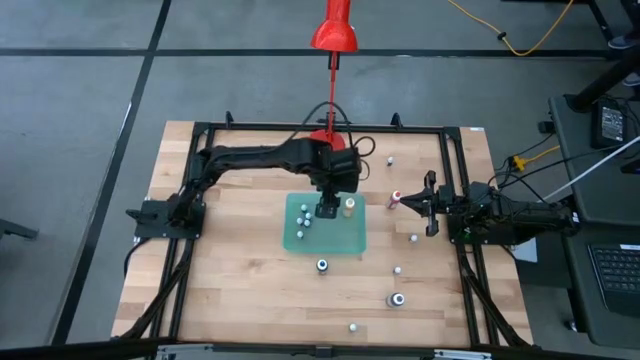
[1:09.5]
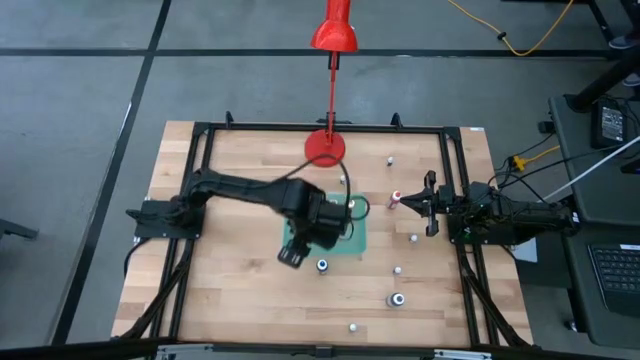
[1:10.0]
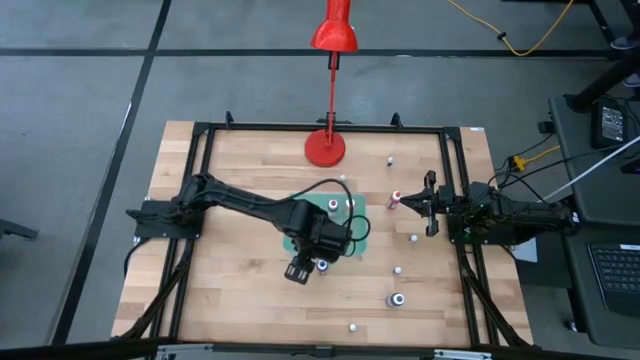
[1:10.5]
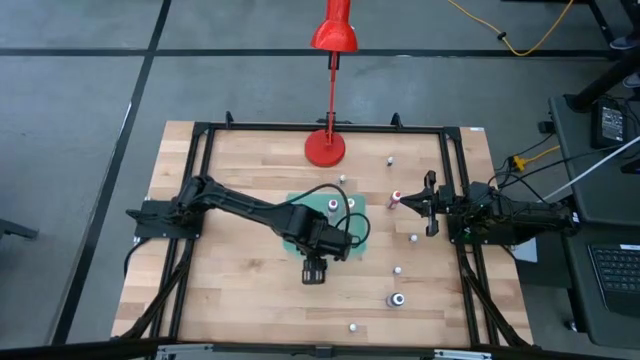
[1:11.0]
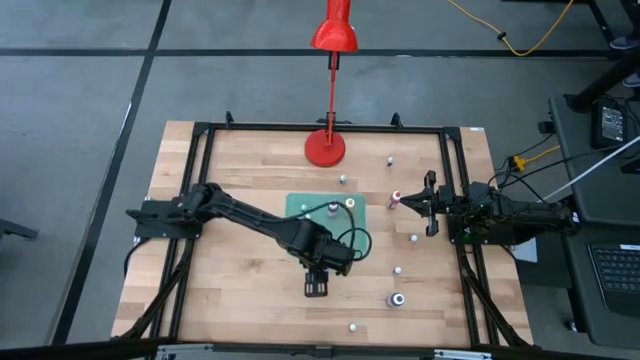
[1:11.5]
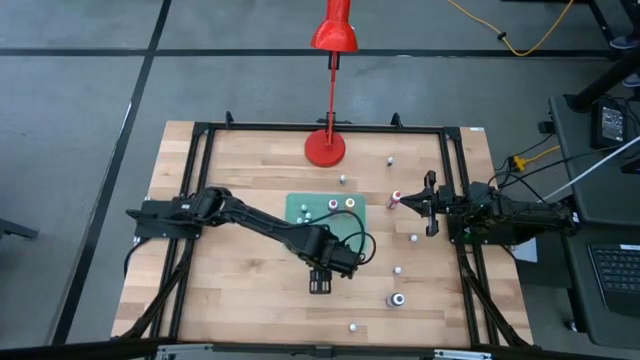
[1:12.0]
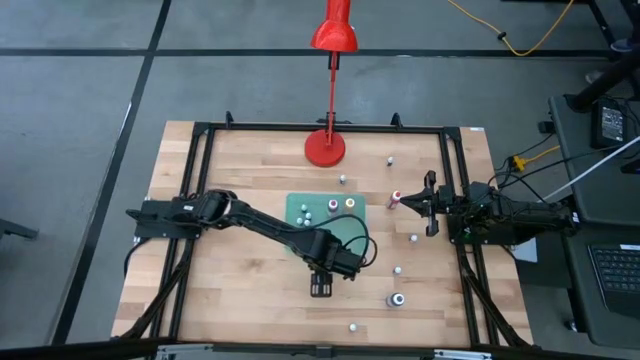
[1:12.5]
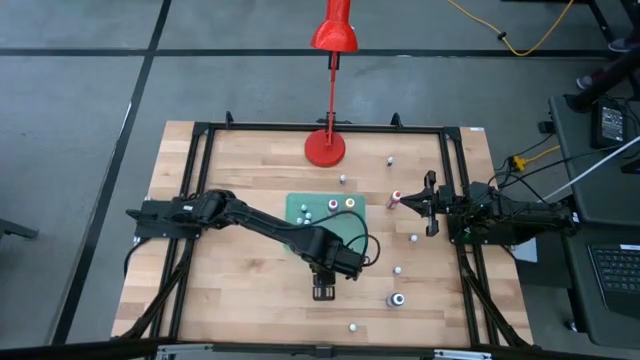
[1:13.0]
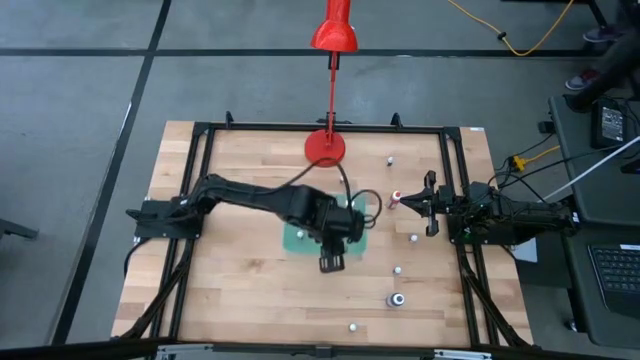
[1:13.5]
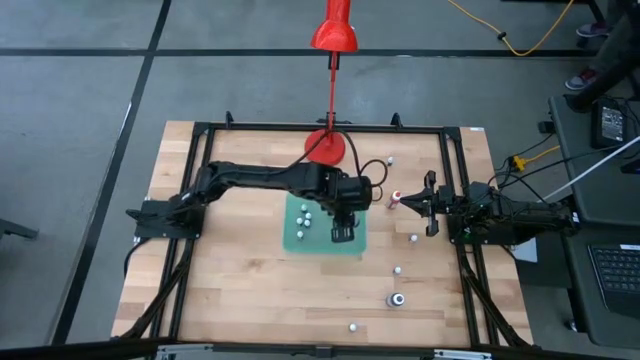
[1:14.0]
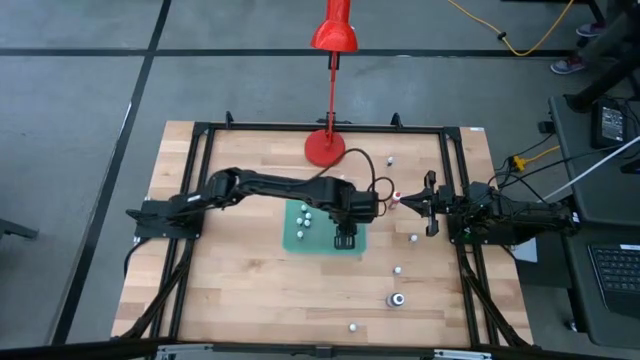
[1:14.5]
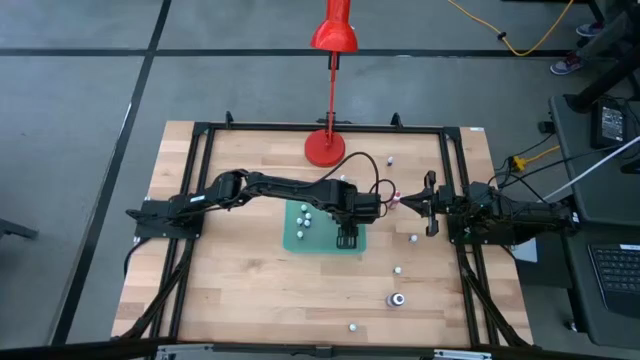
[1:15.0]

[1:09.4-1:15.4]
Task: Pick & Place food coloring
Put the large blue food coloring bottle into the green bin

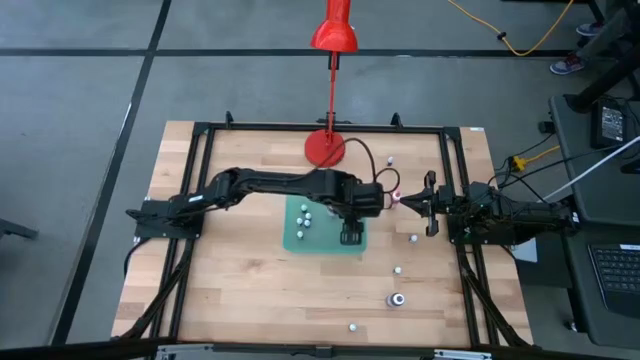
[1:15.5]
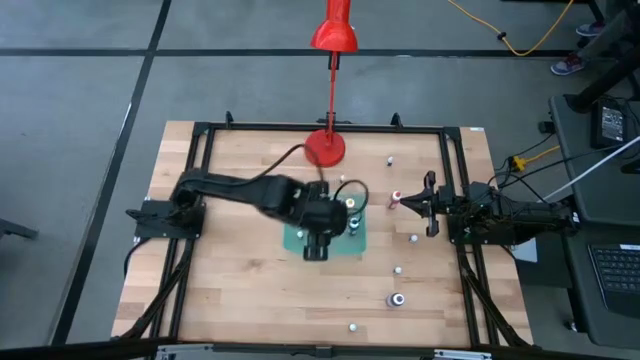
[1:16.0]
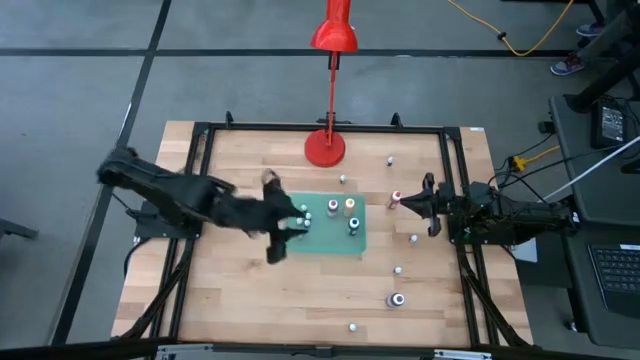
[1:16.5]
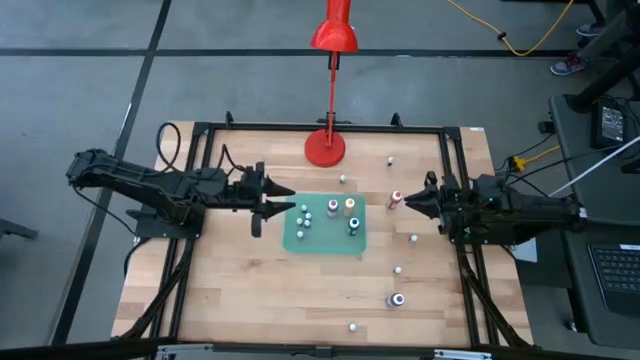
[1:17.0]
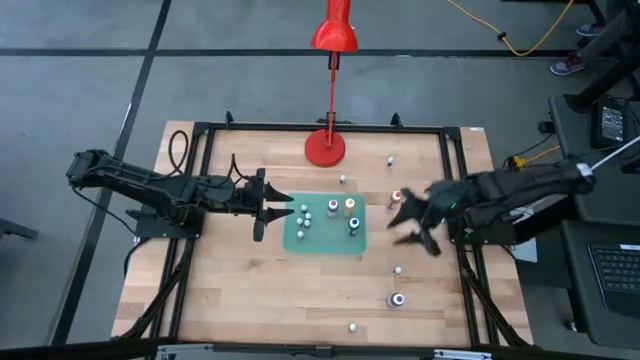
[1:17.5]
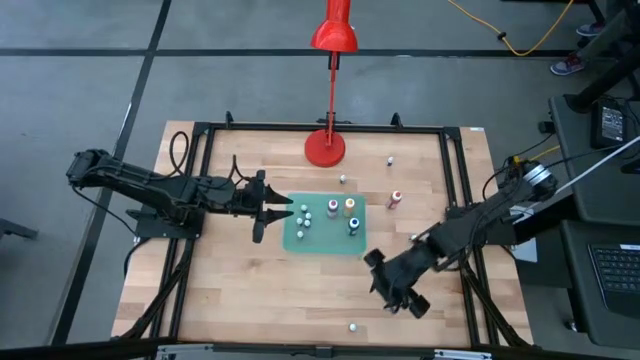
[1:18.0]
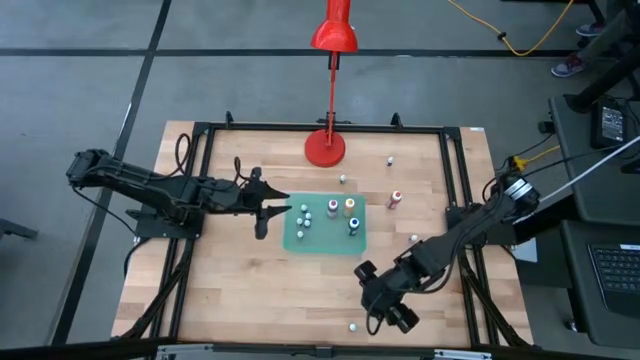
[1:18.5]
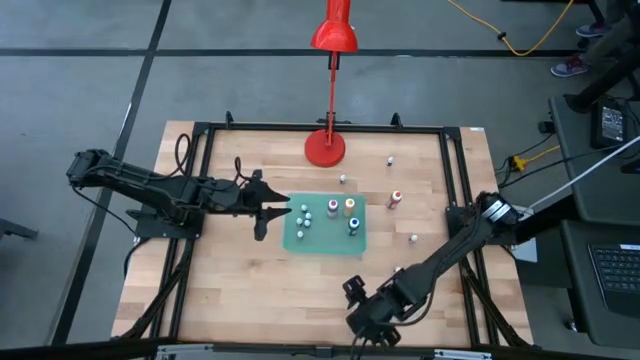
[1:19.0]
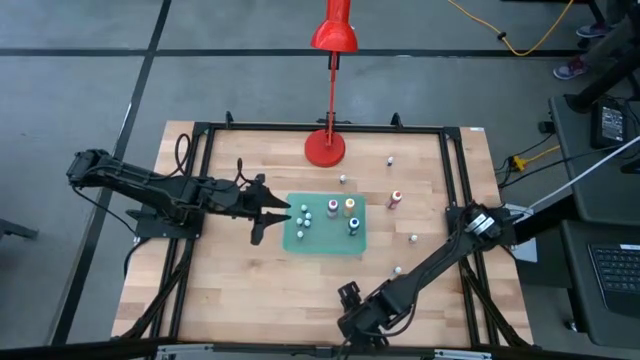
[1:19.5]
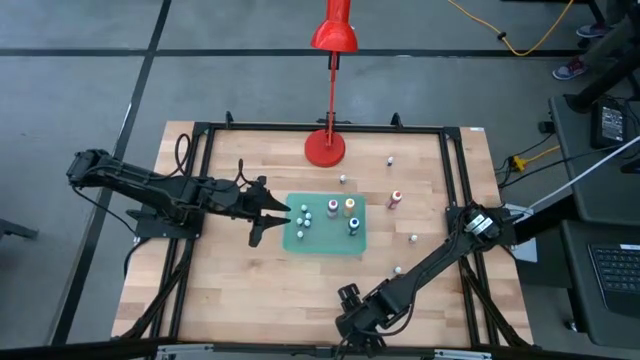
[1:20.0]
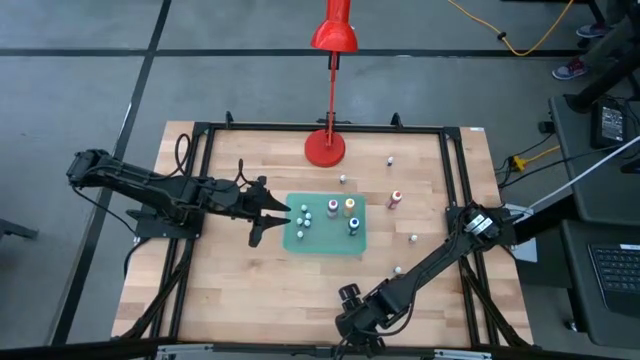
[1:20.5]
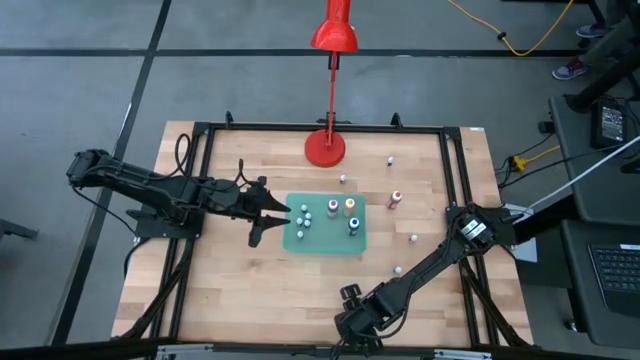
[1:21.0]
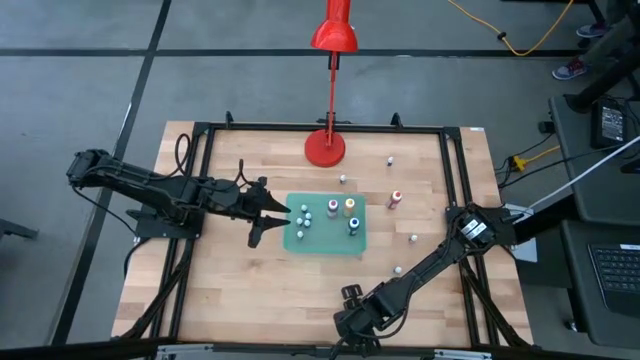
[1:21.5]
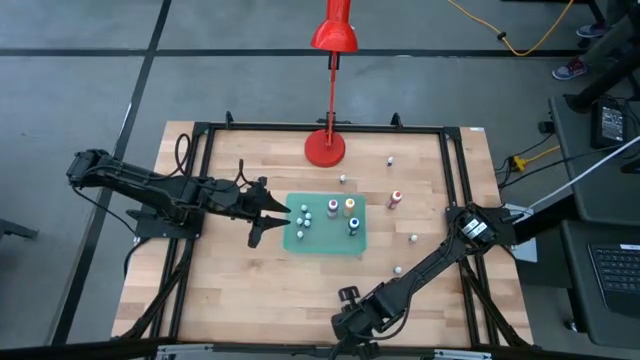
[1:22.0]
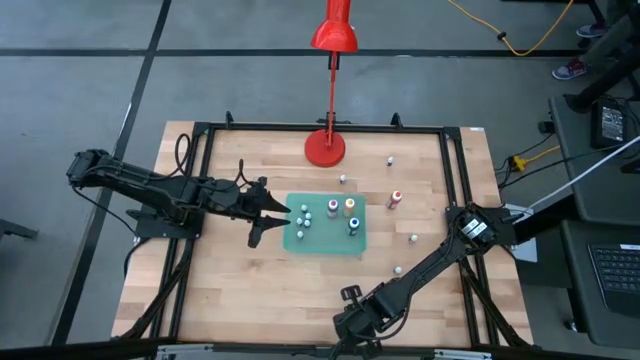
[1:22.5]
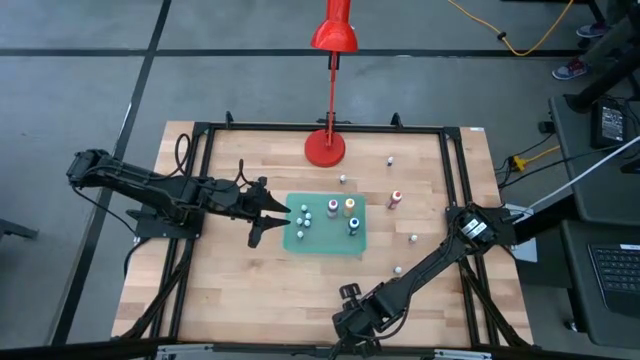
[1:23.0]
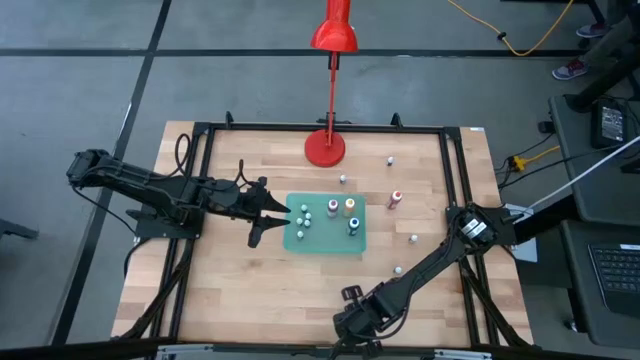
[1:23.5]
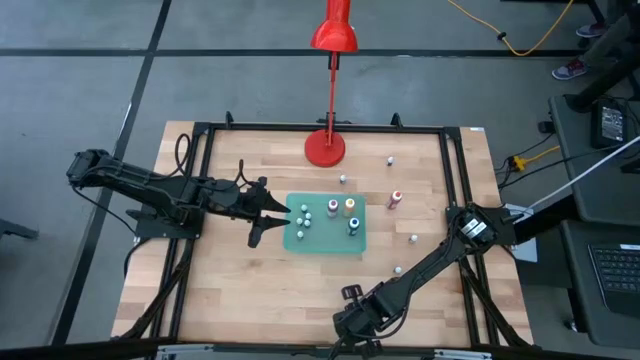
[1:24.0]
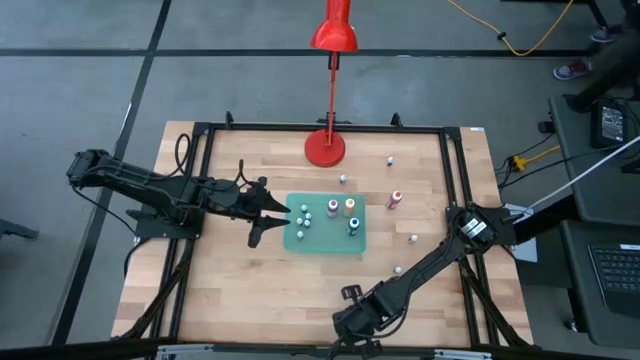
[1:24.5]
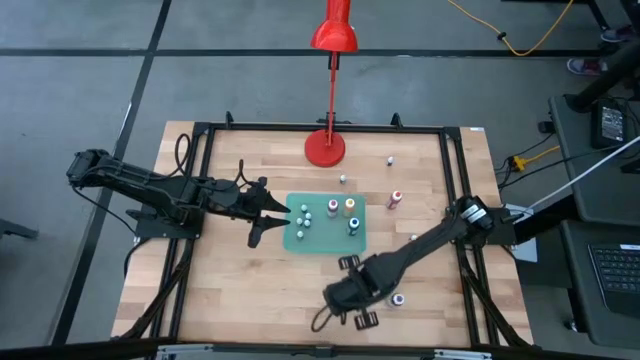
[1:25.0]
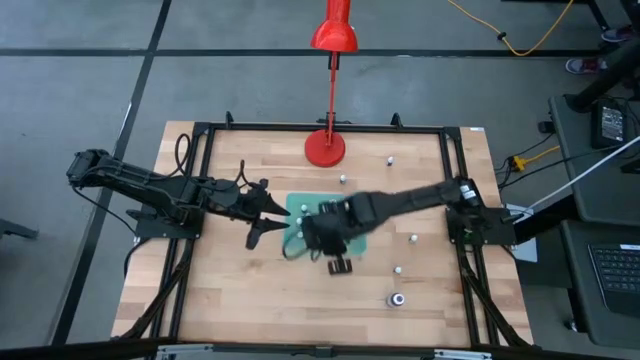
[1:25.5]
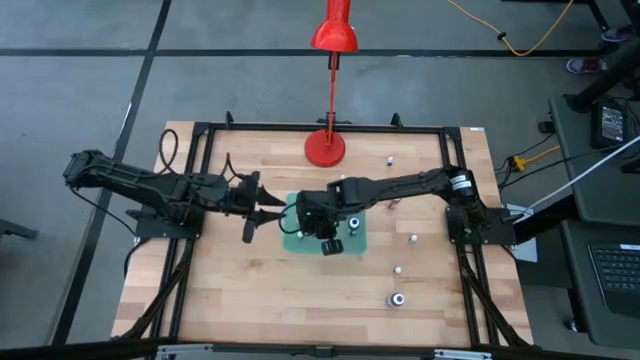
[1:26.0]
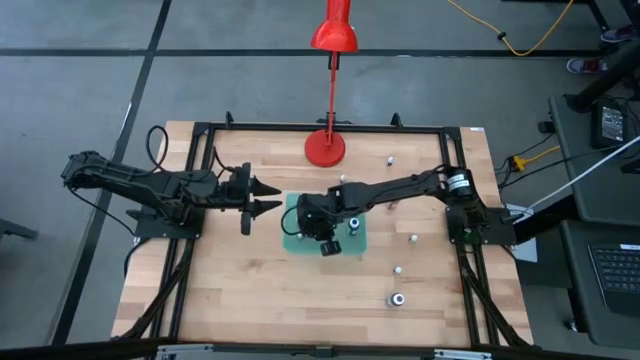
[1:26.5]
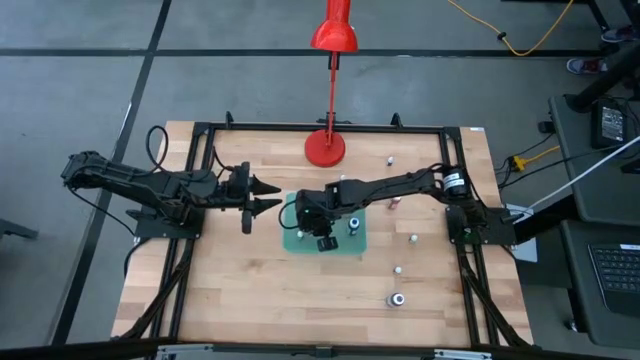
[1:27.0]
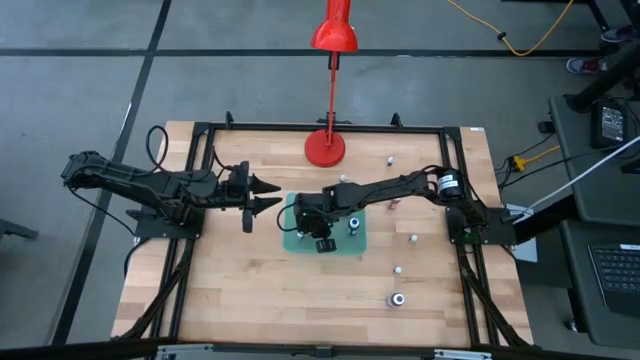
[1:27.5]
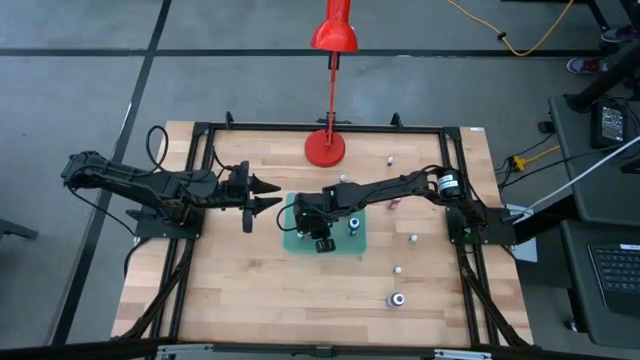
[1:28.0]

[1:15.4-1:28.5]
Put the small orange food coloring bottle into the green bin

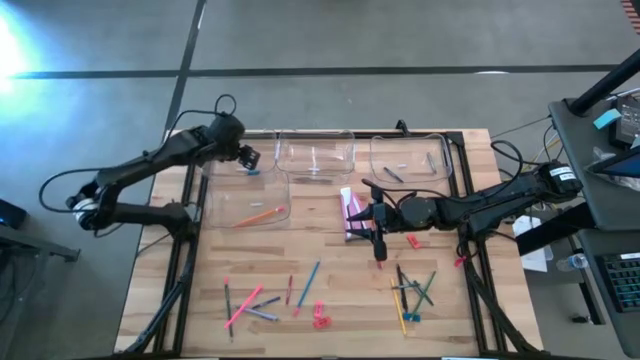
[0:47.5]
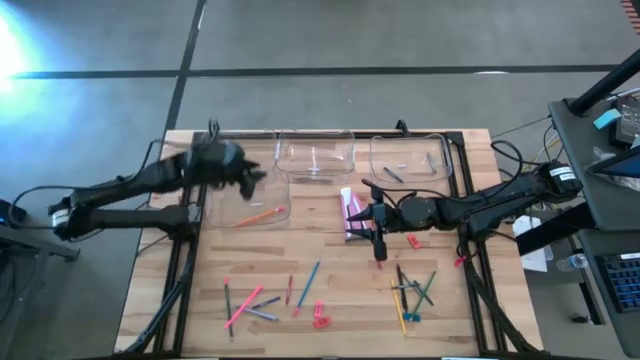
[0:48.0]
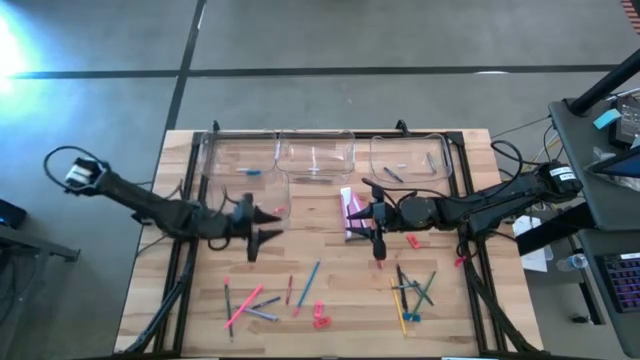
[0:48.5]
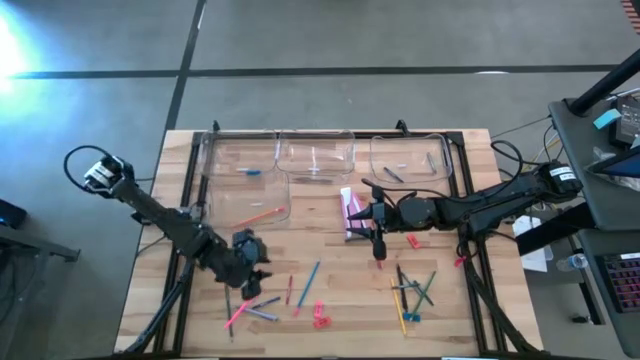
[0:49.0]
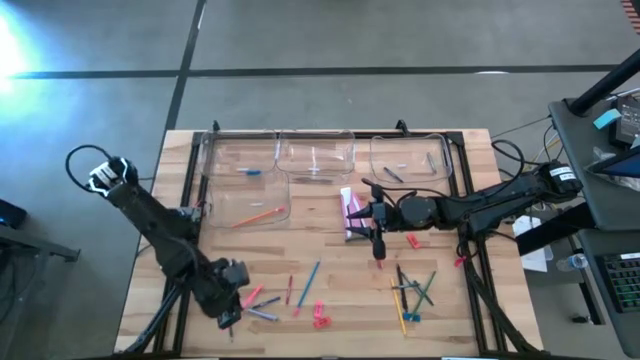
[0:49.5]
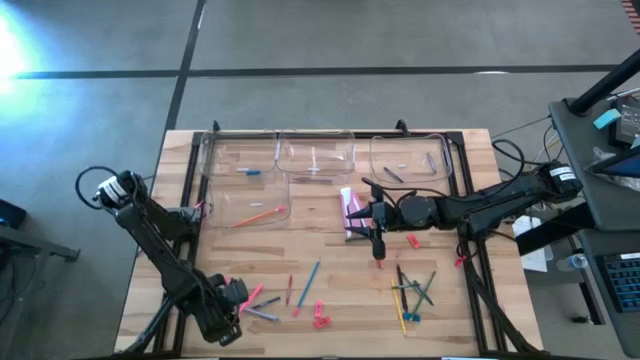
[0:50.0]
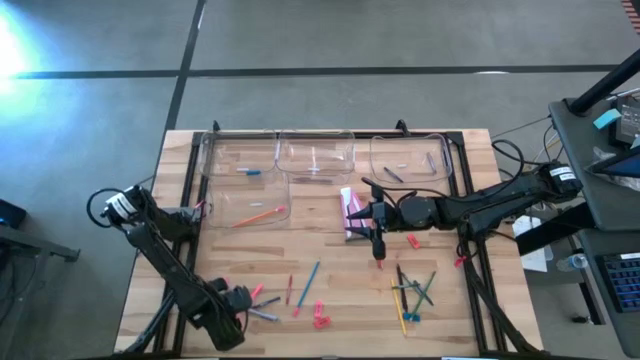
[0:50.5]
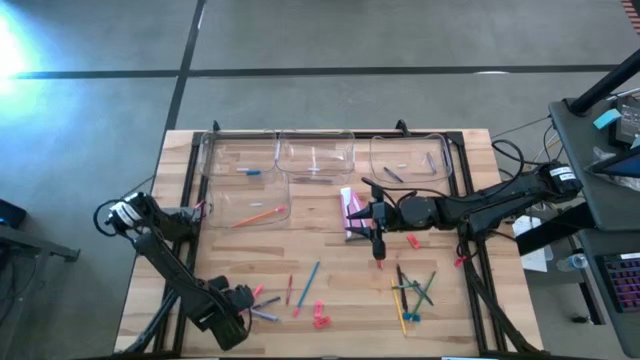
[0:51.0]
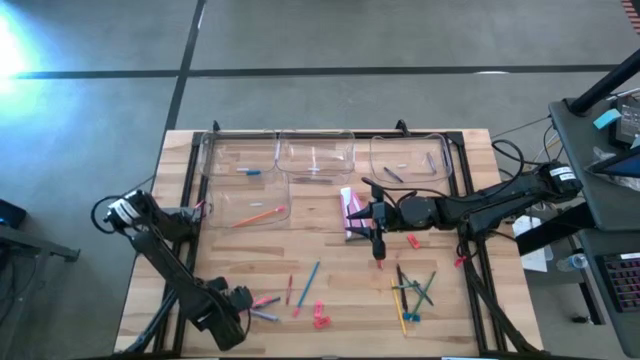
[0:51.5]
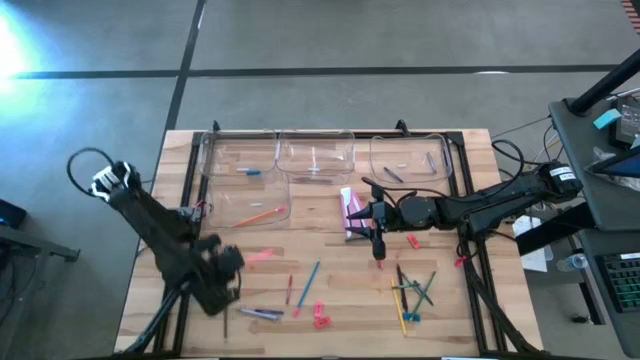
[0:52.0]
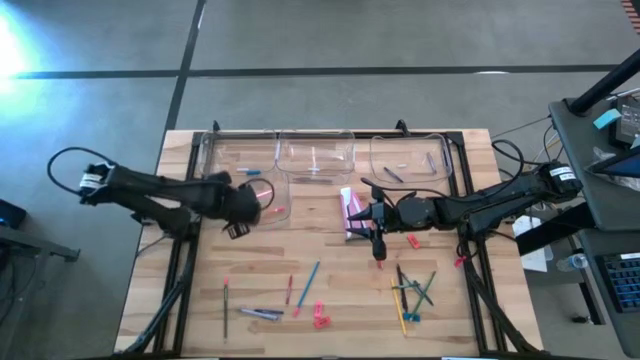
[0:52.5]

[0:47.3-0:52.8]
Task: Sort crayons/erasers/pens/pencils in bins
Put the pink pencil into the bottom left transparent bin
